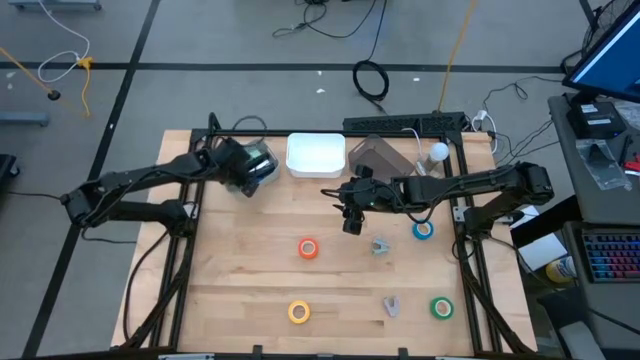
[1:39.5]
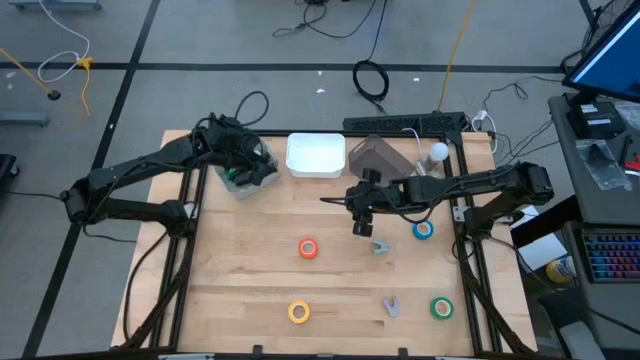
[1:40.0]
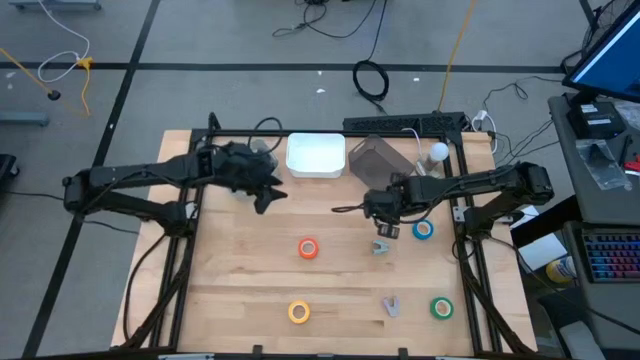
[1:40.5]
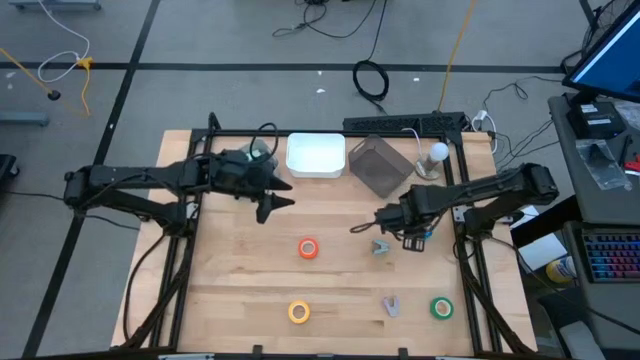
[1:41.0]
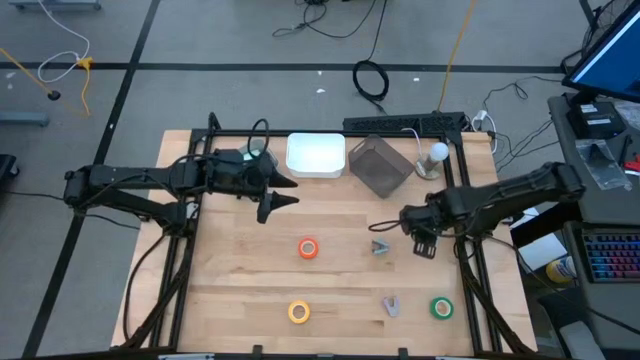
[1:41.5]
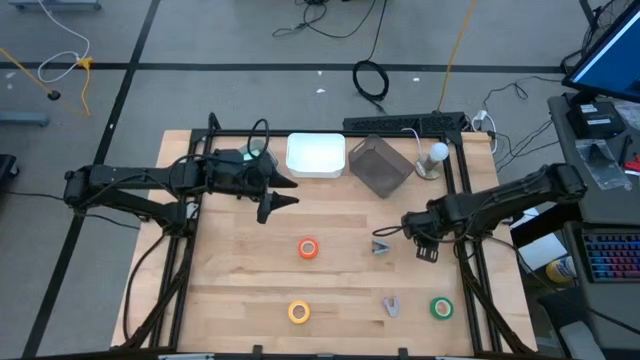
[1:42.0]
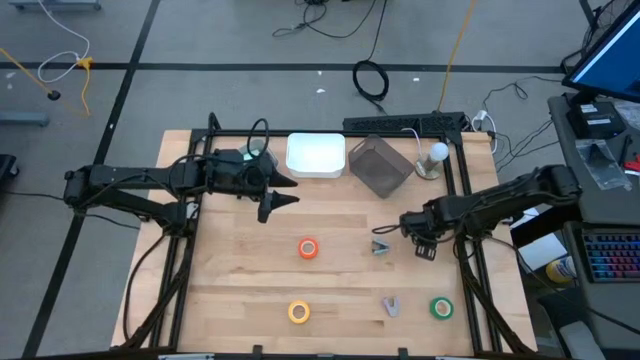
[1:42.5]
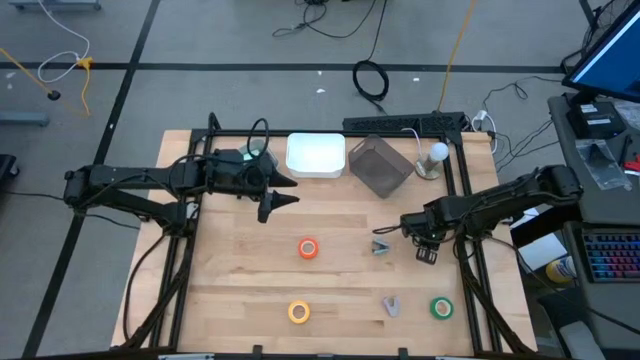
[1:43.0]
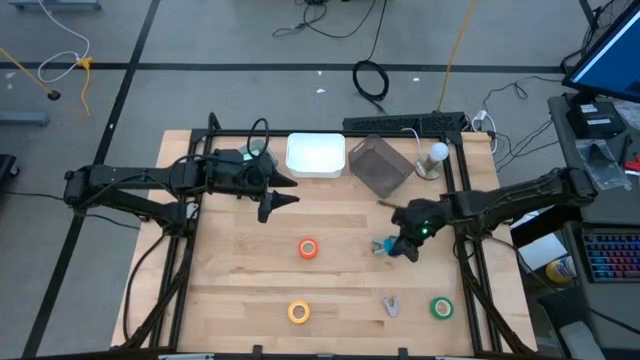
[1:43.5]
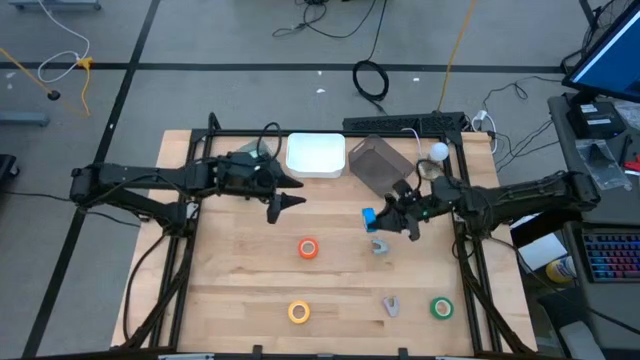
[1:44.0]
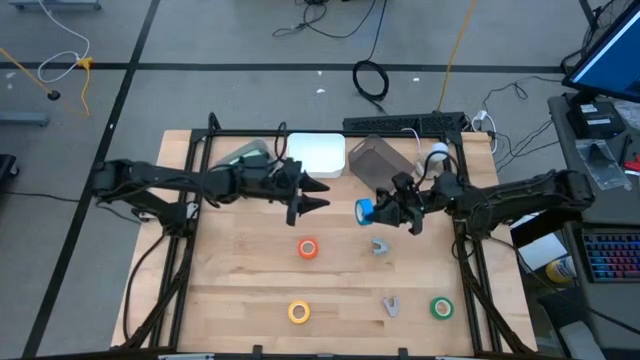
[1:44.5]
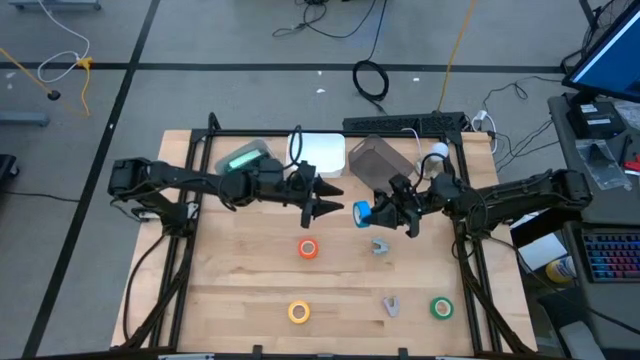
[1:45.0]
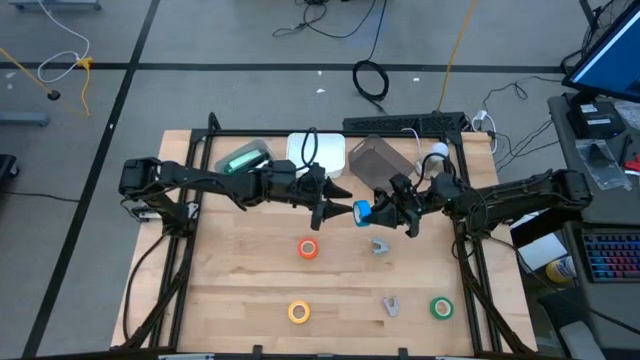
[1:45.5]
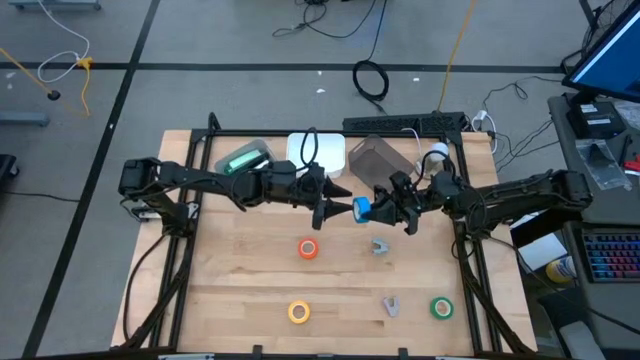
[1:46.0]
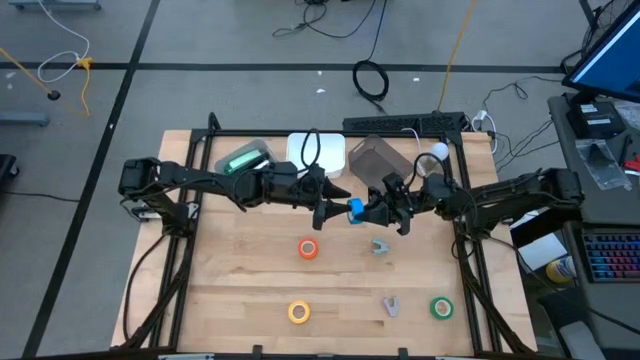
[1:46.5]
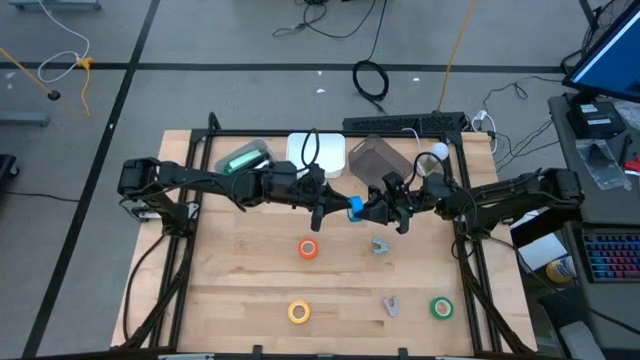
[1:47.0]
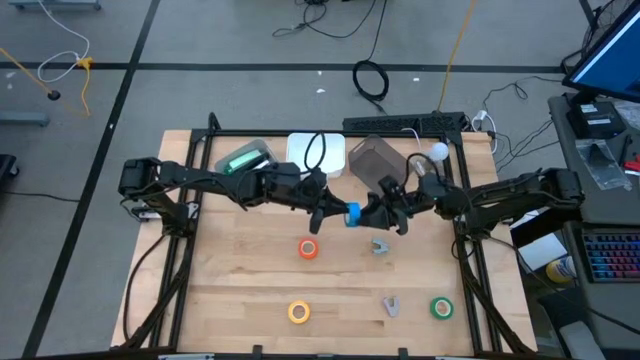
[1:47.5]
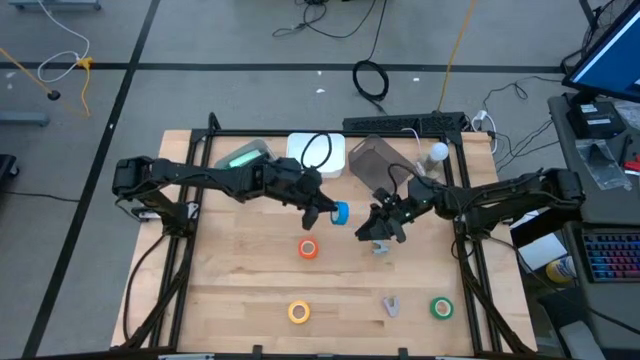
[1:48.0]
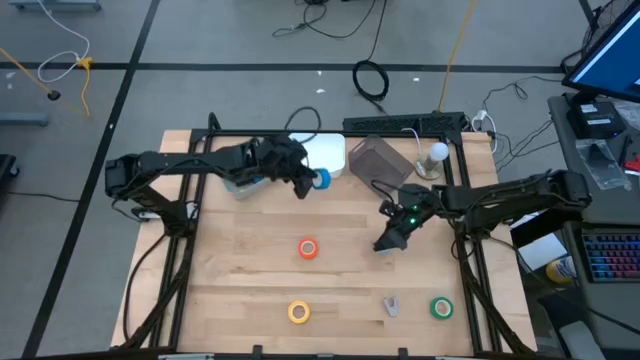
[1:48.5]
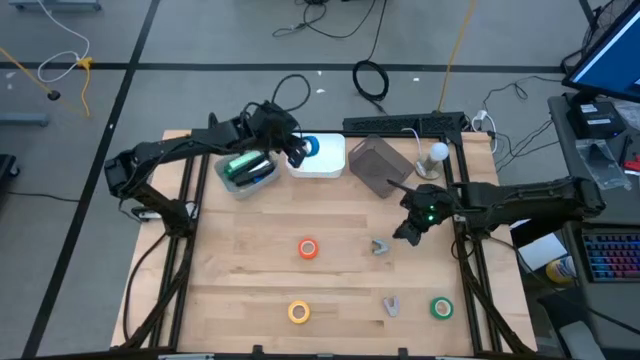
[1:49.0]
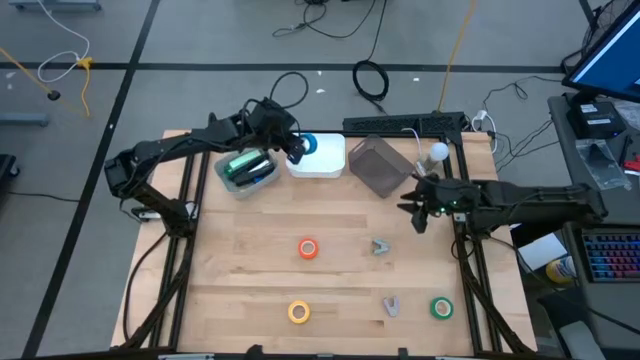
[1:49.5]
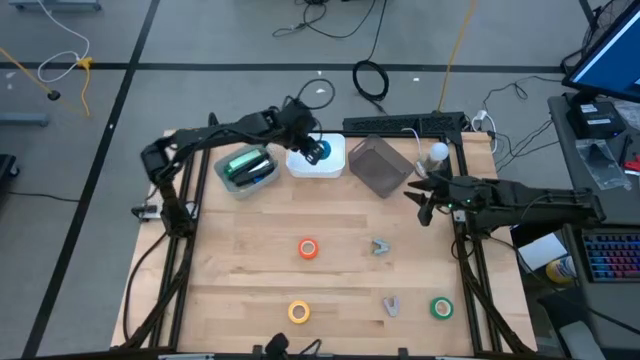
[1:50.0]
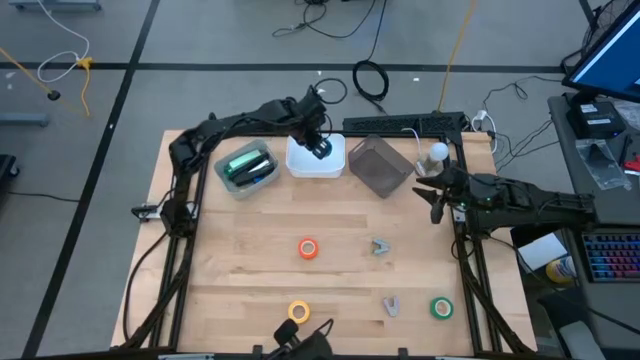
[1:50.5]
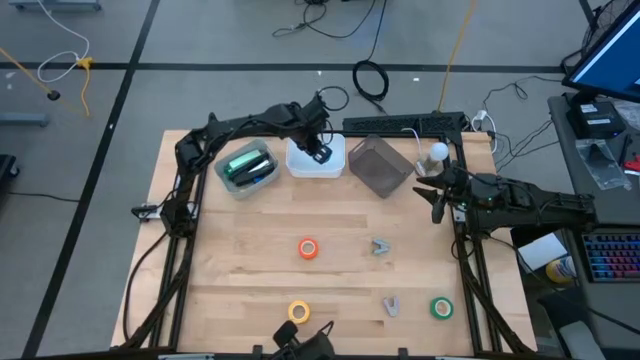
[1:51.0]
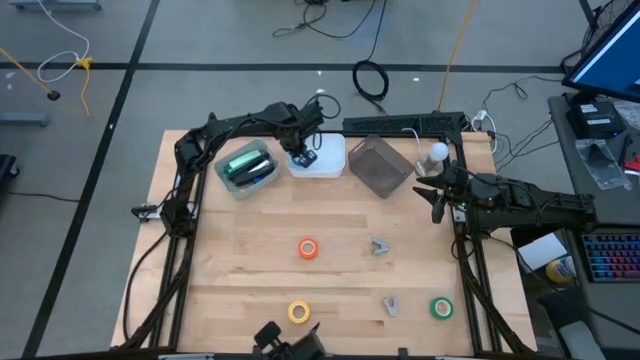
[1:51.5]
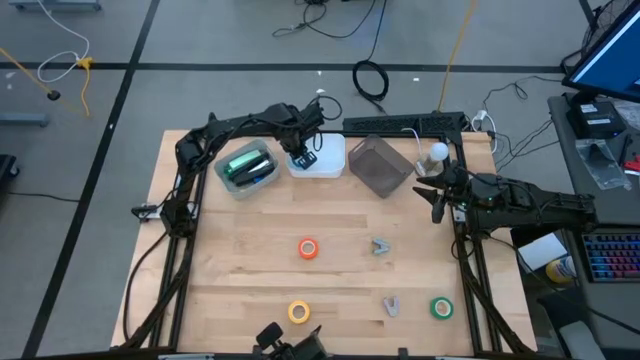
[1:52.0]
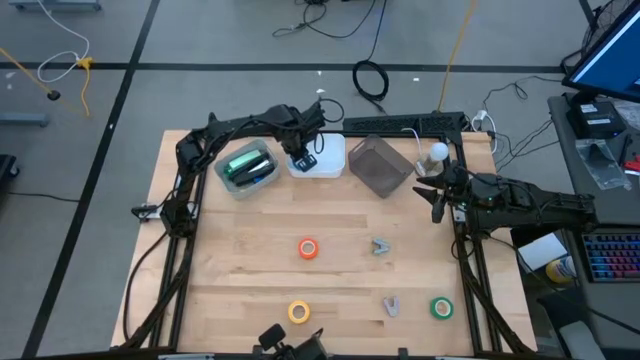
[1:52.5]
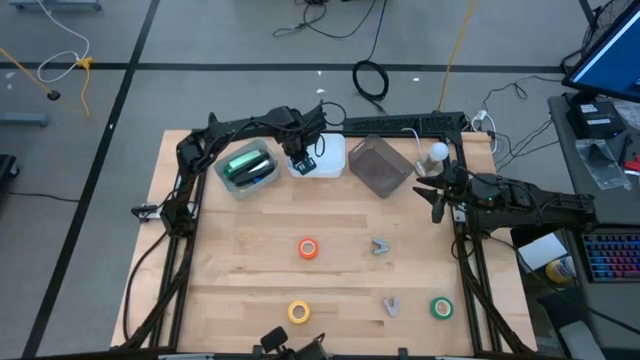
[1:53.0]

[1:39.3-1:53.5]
Task: Pick and place Stapler, Stapler remover, tape
Put the blue tape into the white bin

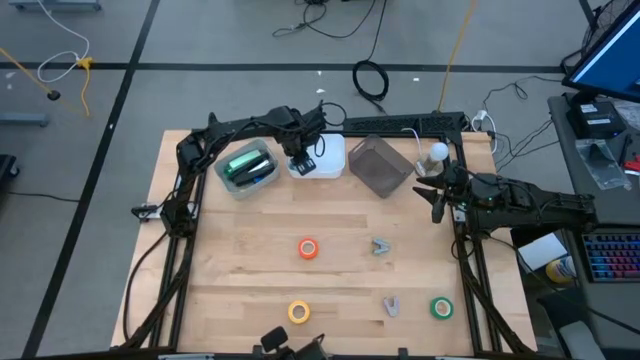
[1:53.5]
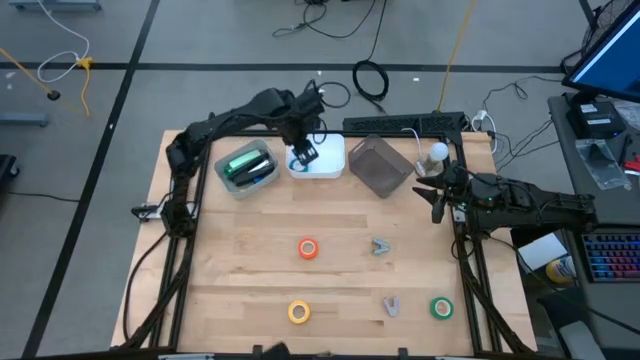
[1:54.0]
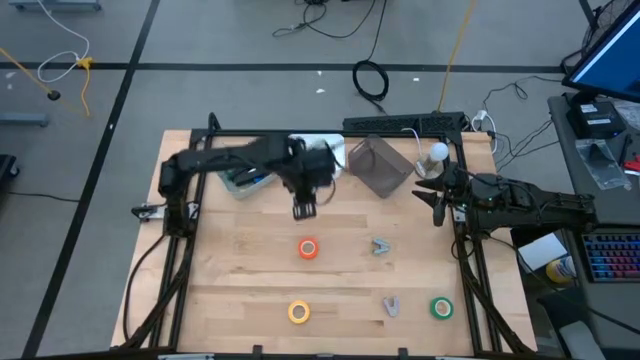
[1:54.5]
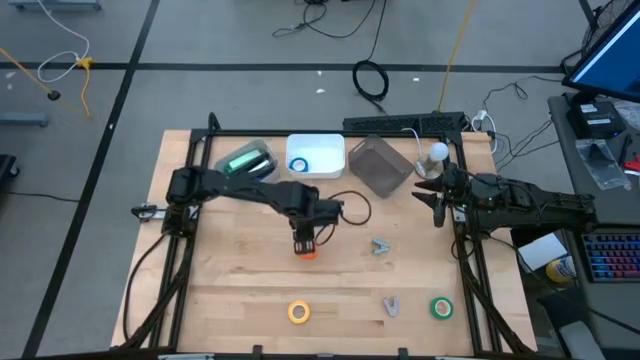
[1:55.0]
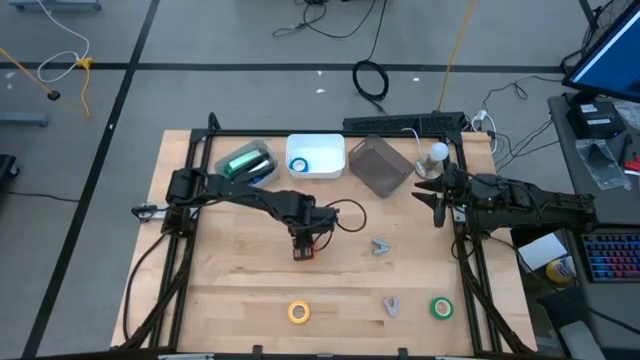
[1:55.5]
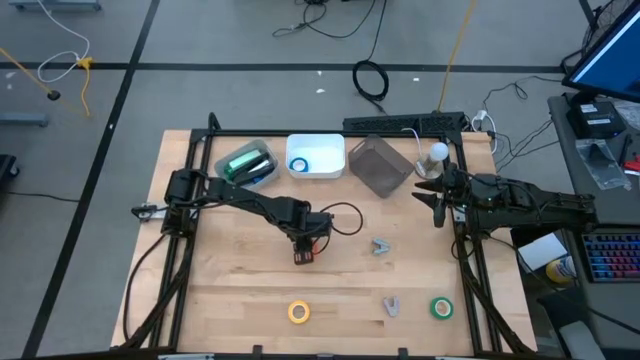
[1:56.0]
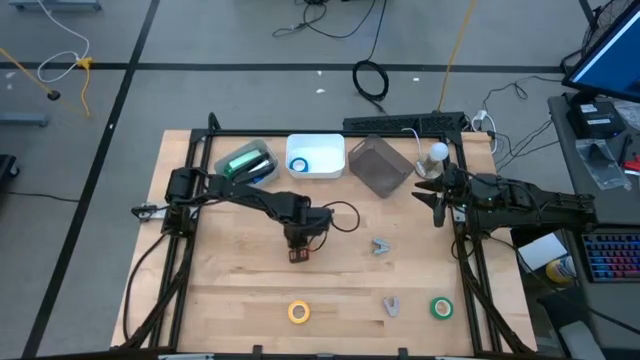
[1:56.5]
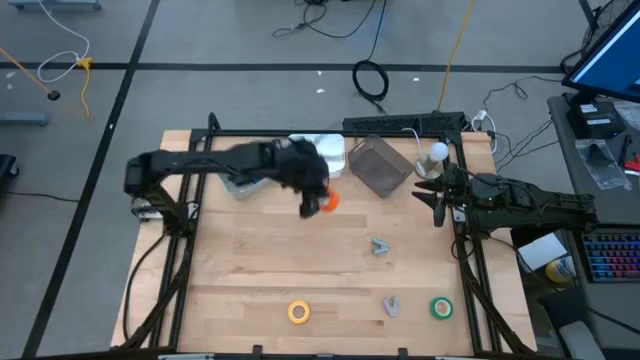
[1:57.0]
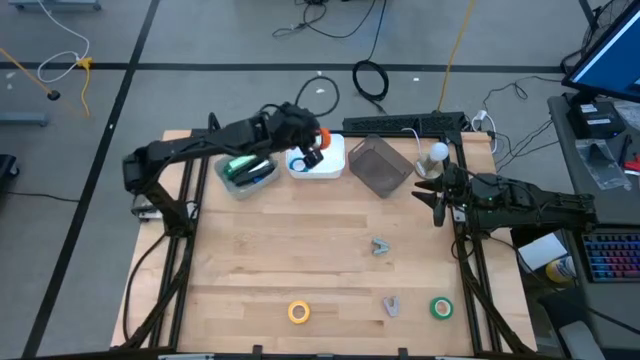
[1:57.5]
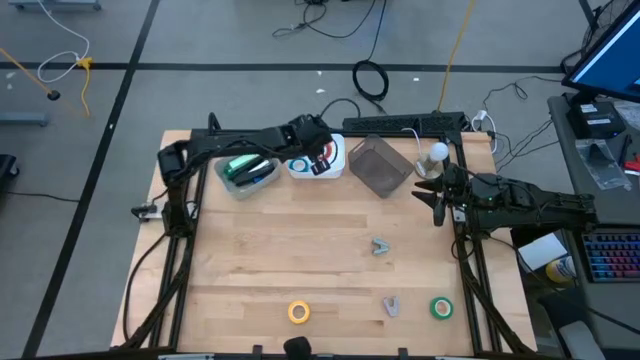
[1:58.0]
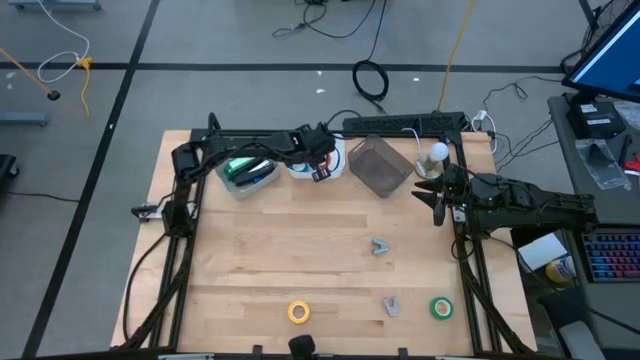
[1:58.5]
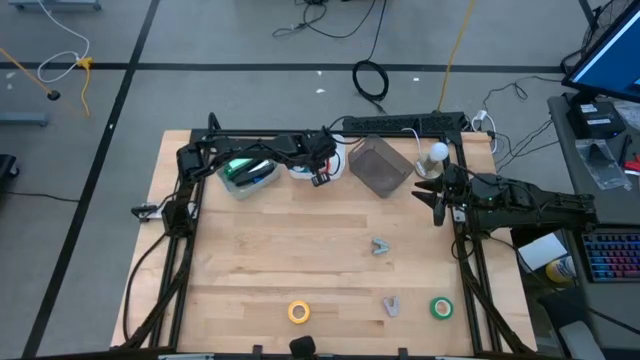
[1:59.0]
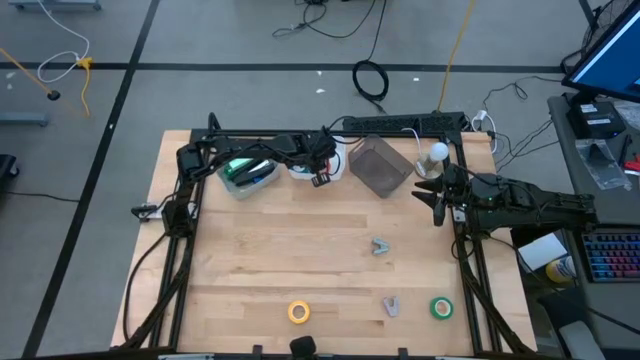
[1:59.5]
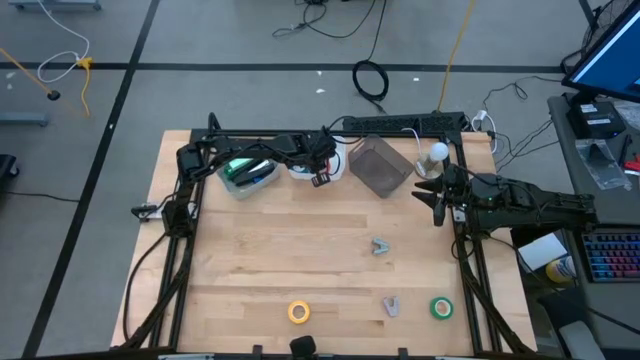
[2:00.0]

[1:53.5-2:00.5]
Put the orange tape into the white bin

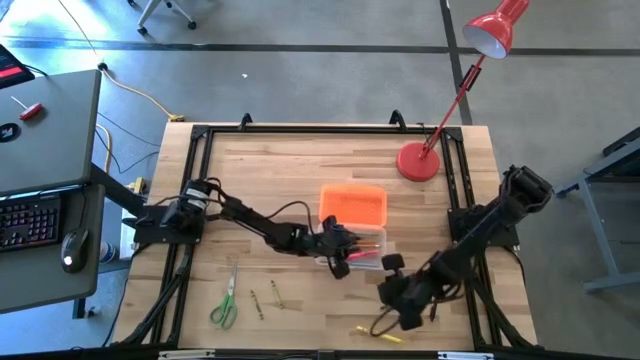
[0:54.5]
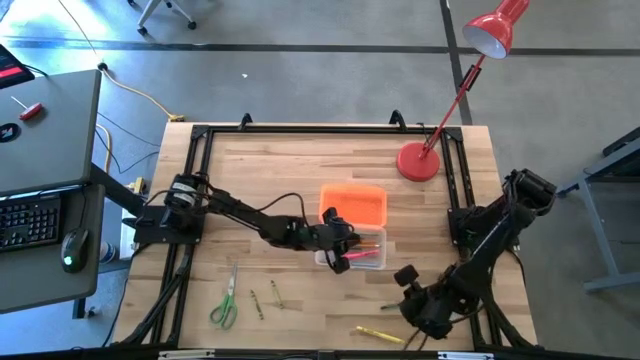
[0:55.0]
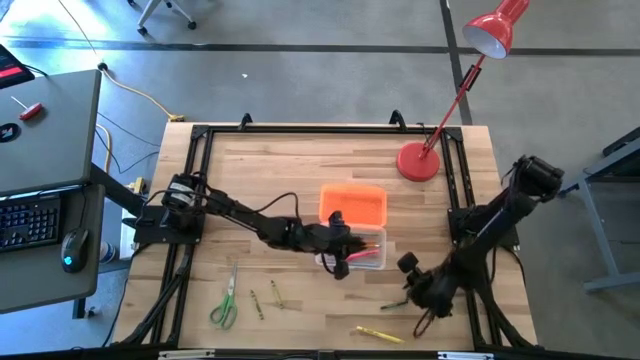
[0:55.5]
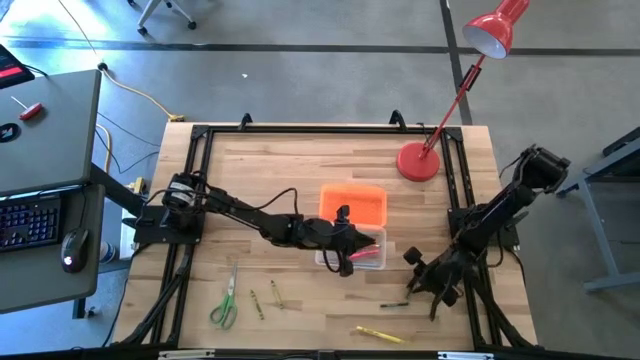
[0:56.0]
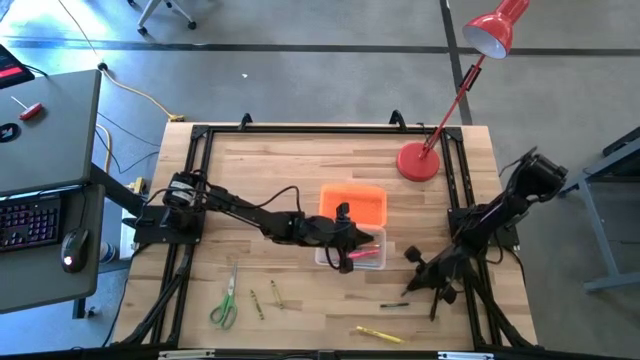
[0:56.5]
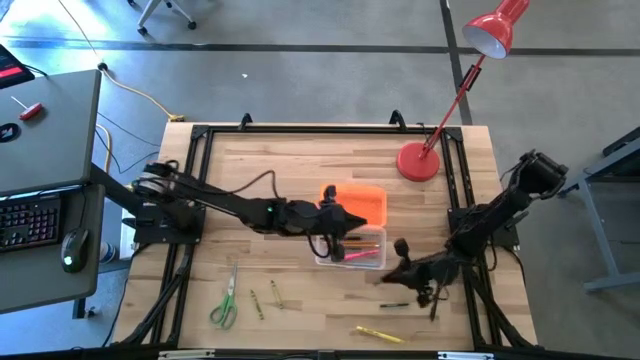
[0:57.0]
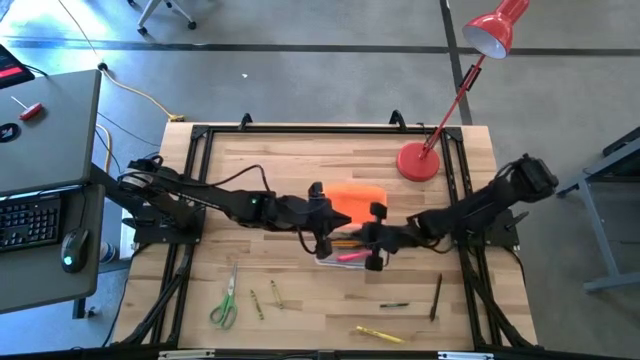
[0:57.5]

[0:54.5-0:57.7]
Task: Pick & place school supplies into a supply box
Put the right dark green crayon into the supply box
